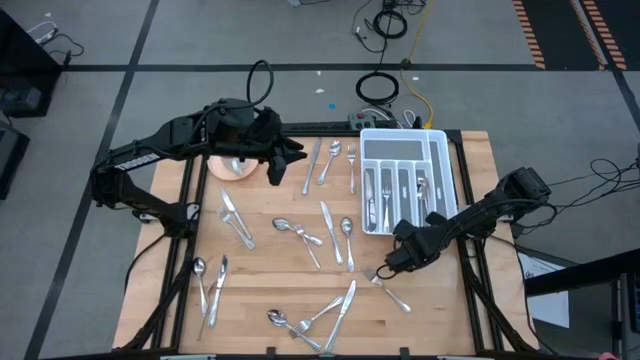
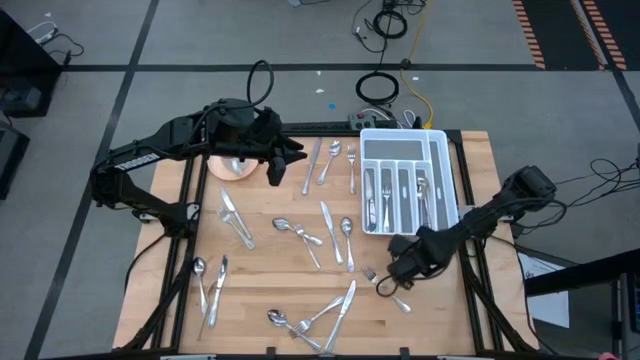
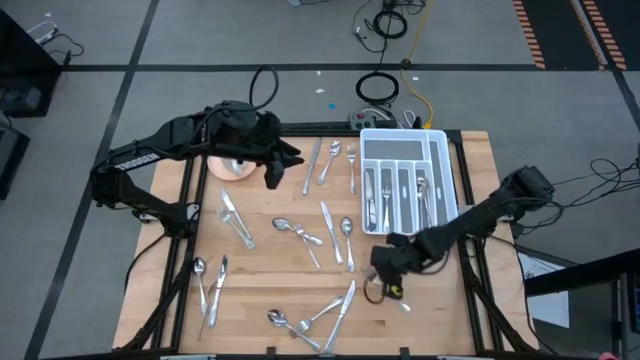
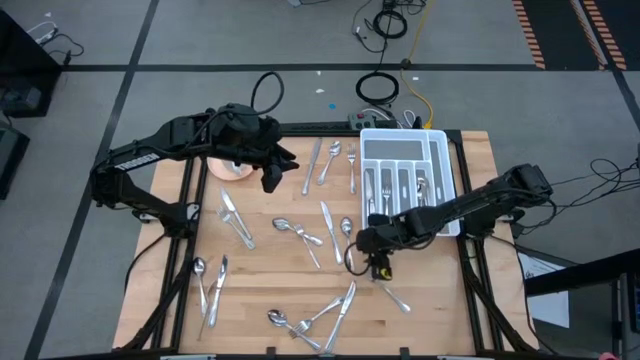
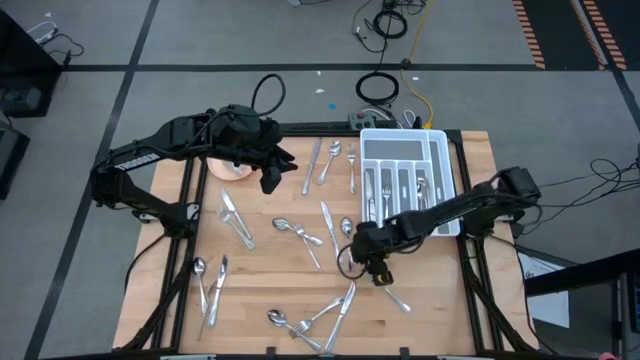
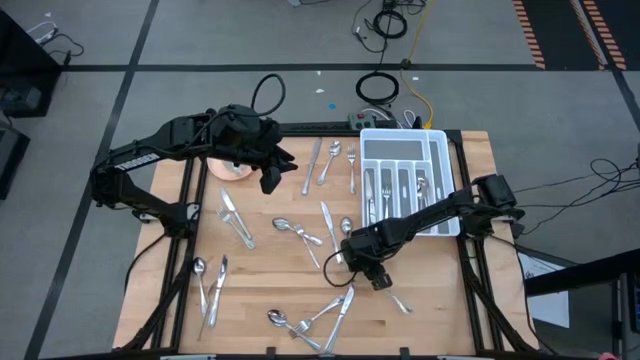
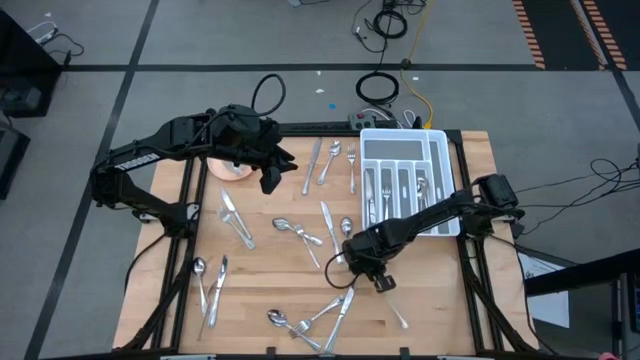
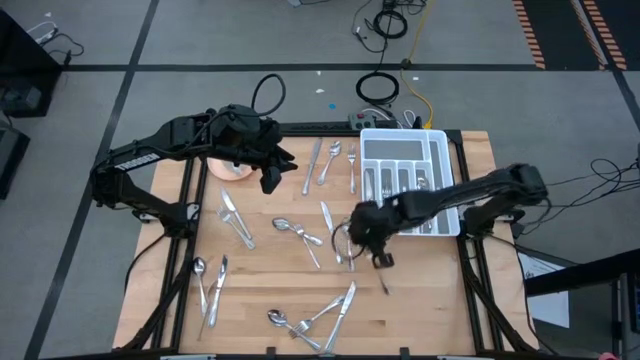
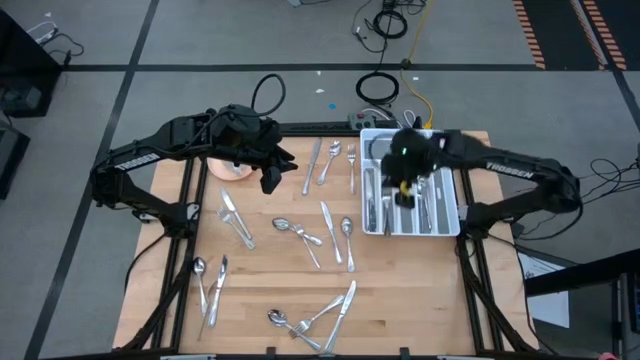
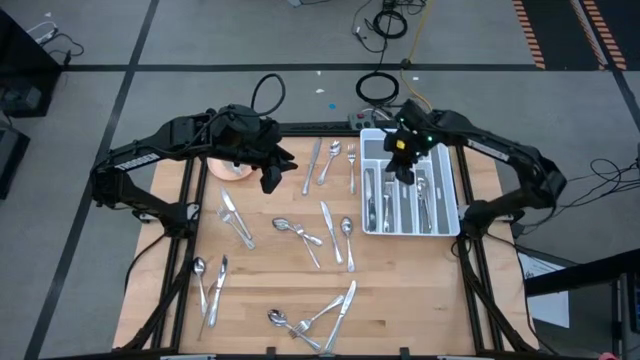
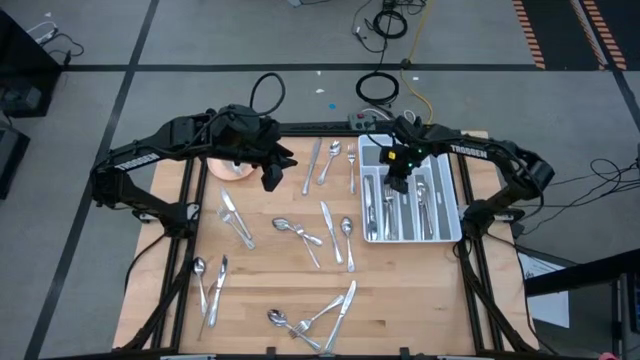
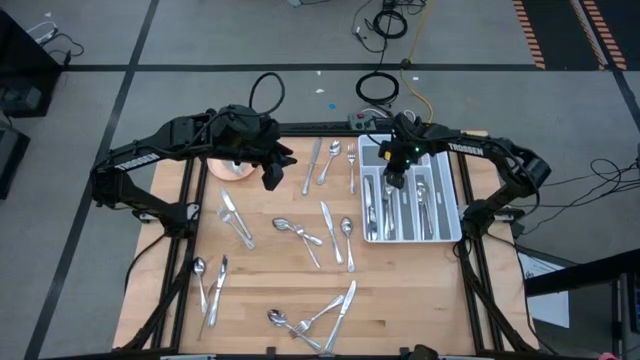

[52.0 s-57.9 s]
Task: Sort silverware
Put the silver fork into the silverware rack

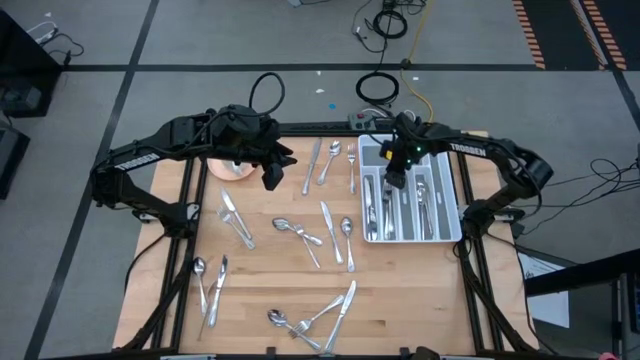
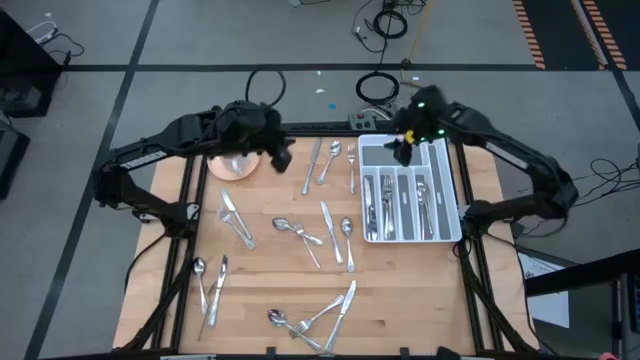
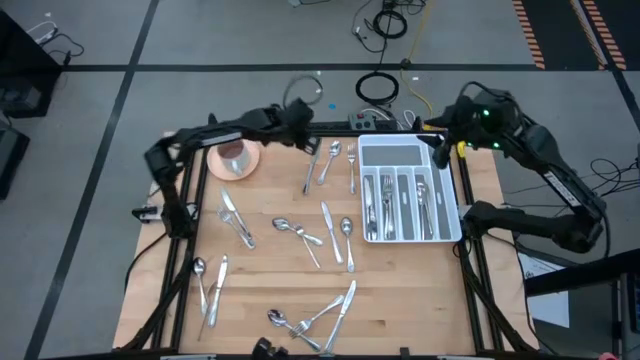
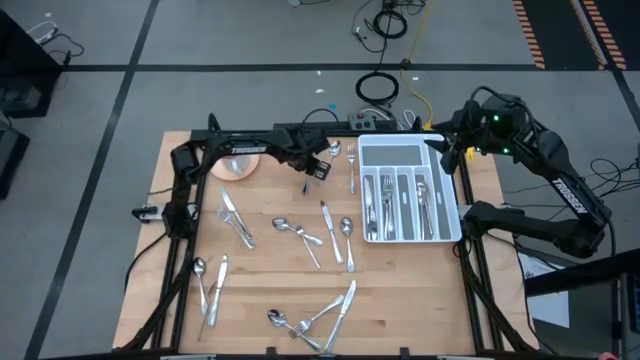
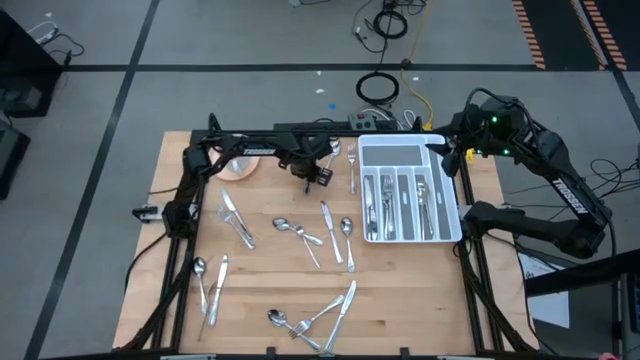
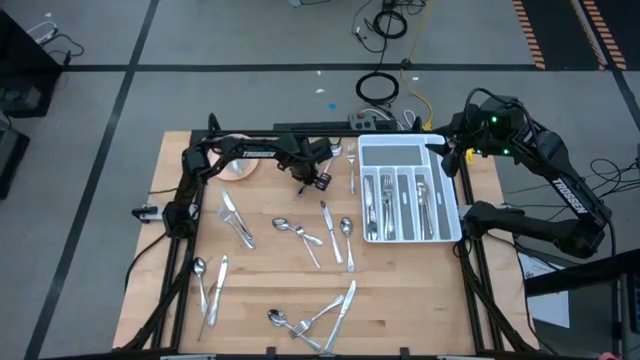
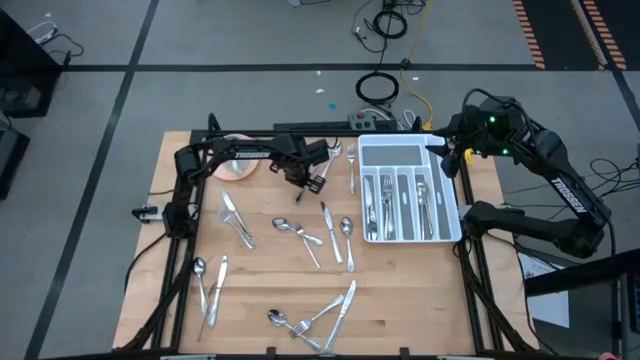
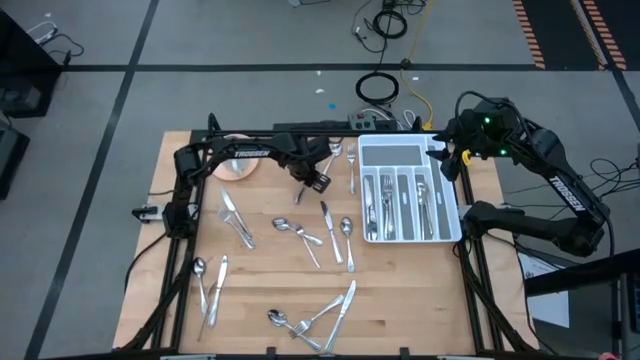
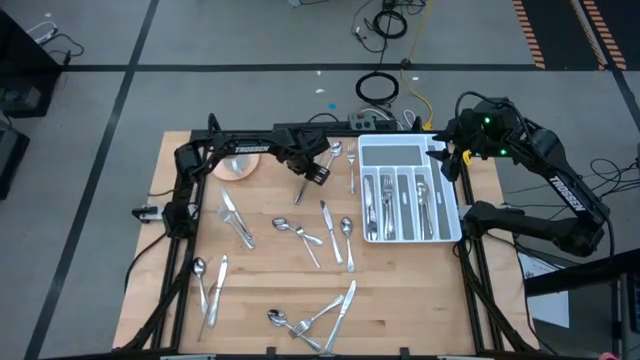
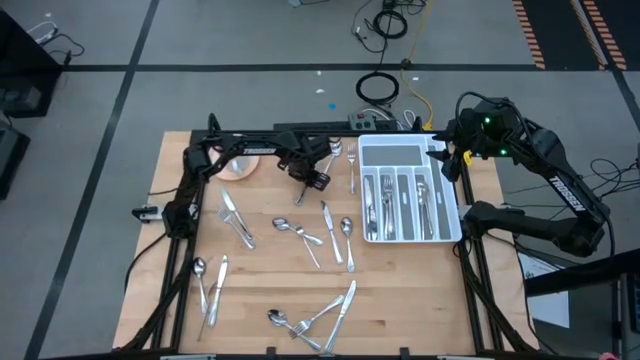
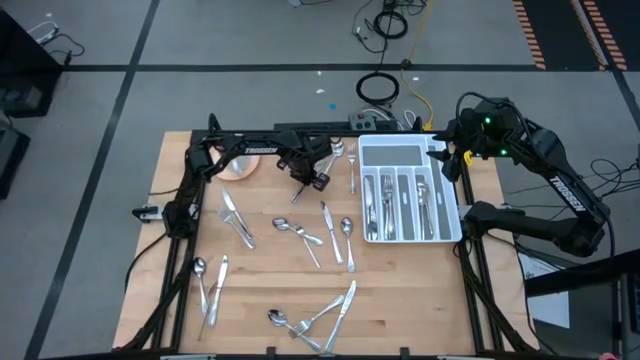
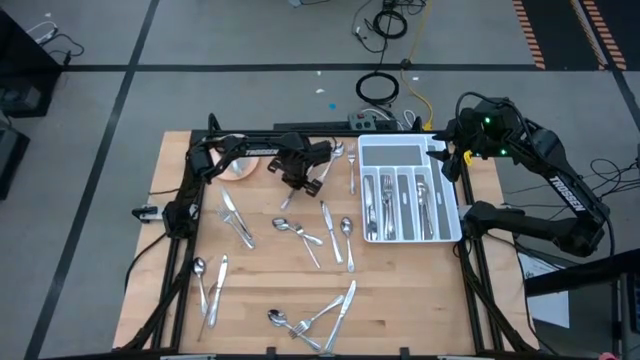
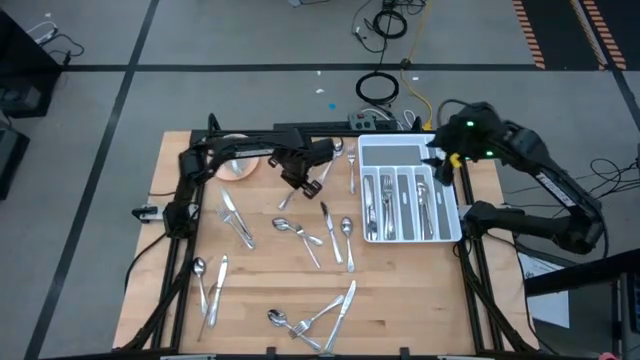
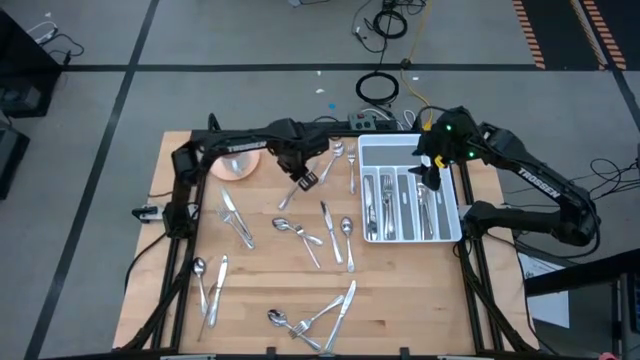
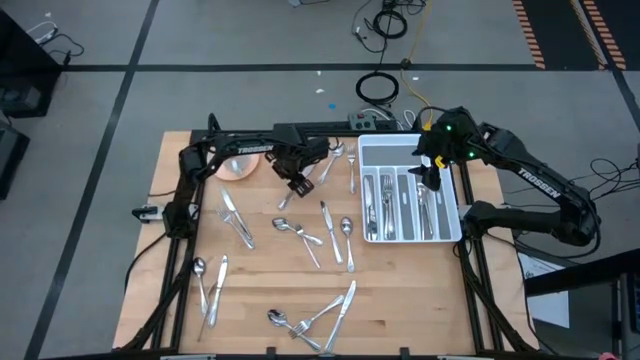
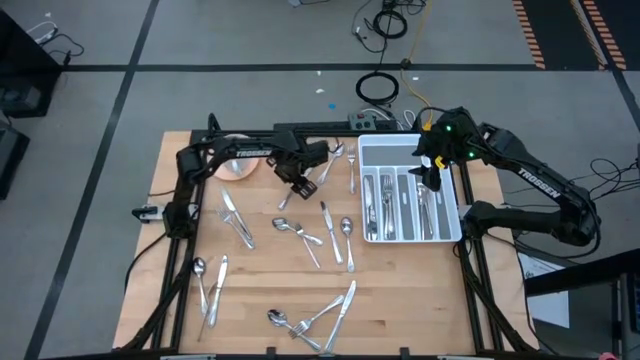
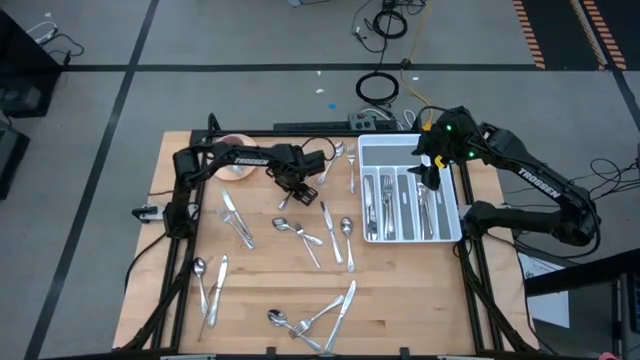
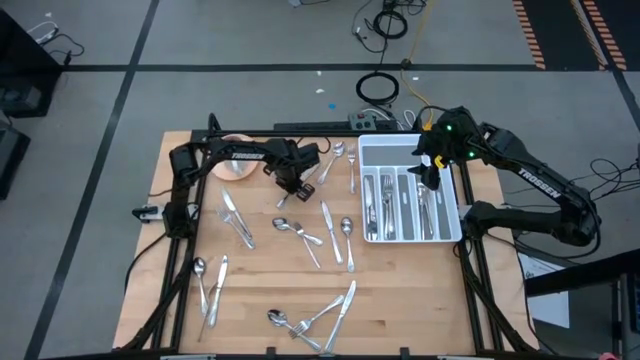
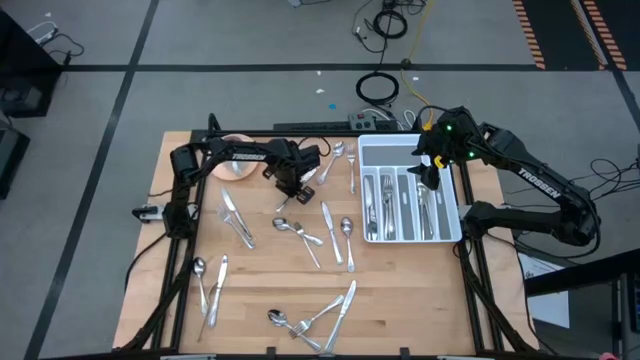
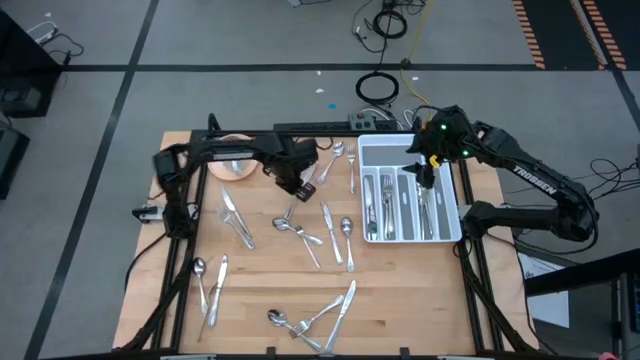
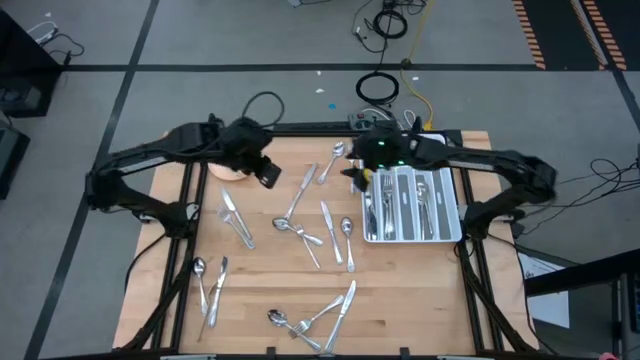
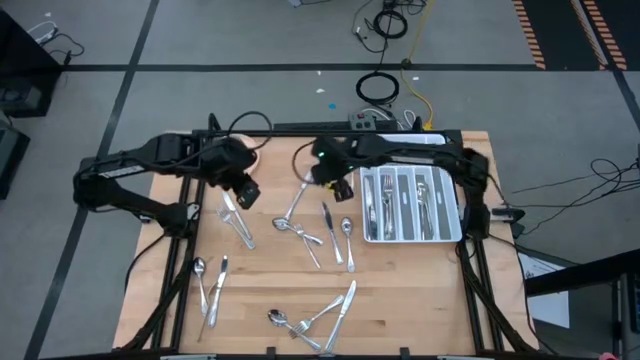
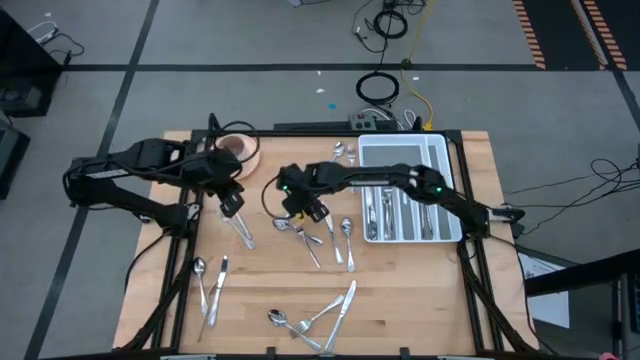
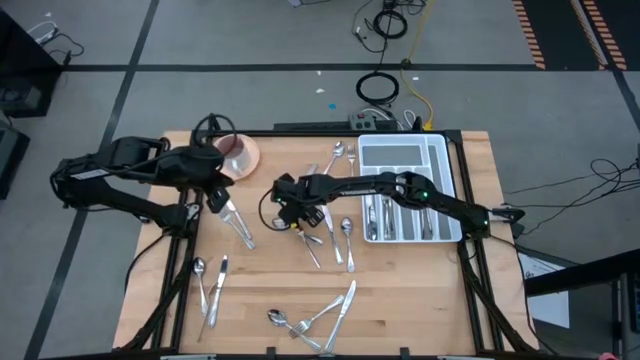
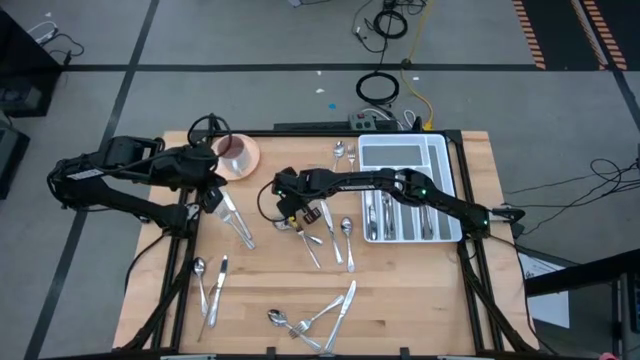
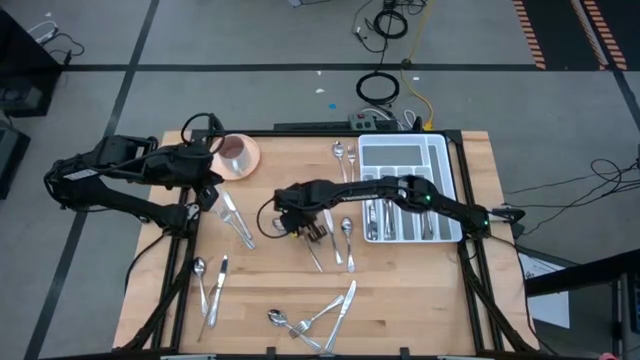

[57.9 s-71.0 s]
Put the knife into the silverware rack
